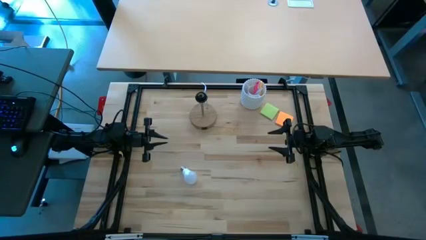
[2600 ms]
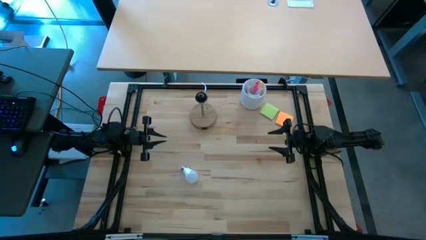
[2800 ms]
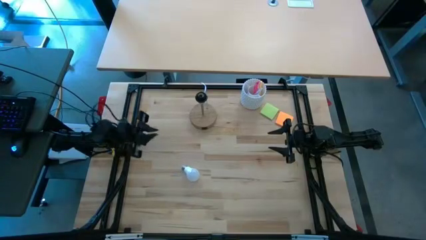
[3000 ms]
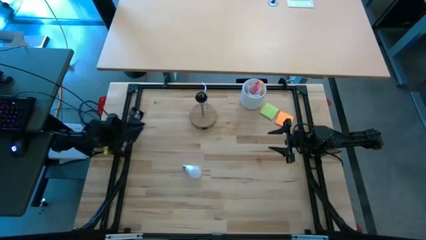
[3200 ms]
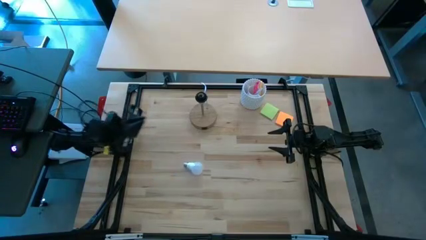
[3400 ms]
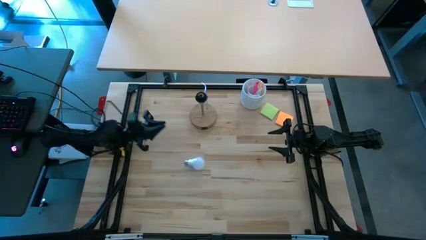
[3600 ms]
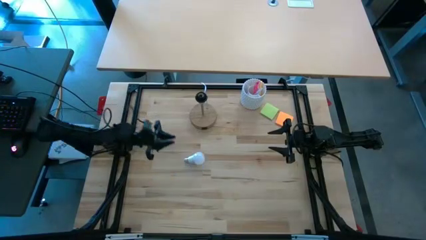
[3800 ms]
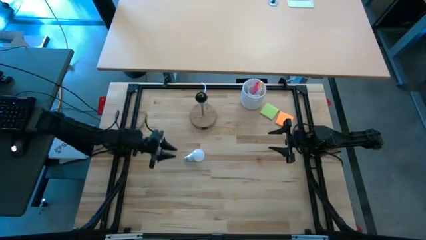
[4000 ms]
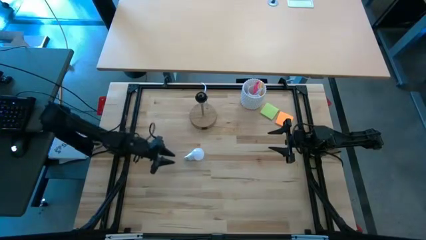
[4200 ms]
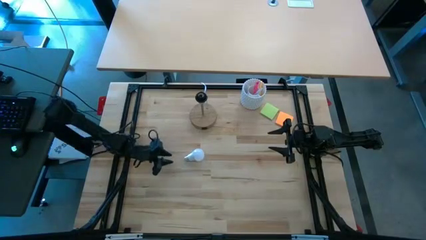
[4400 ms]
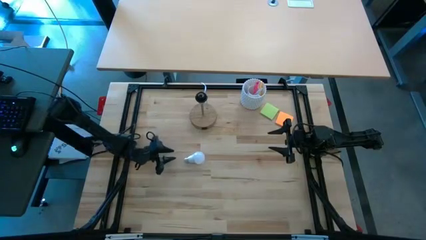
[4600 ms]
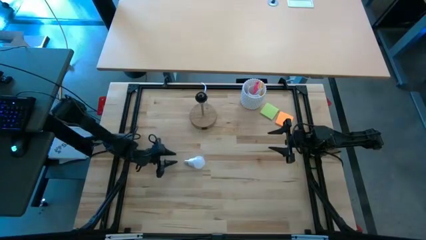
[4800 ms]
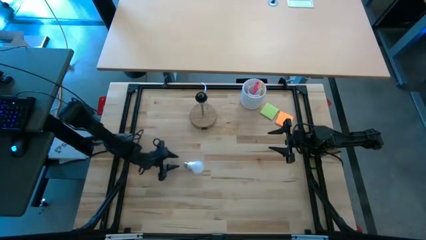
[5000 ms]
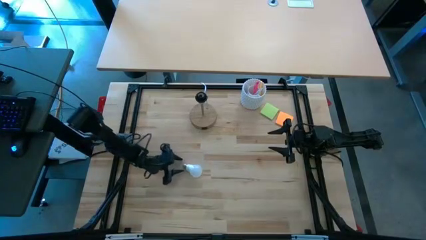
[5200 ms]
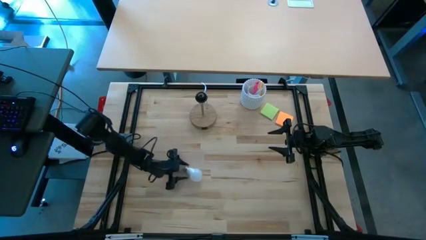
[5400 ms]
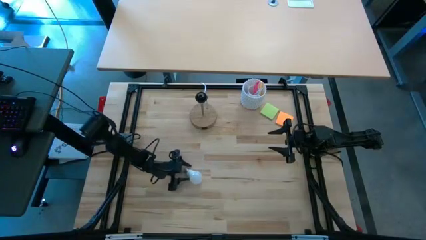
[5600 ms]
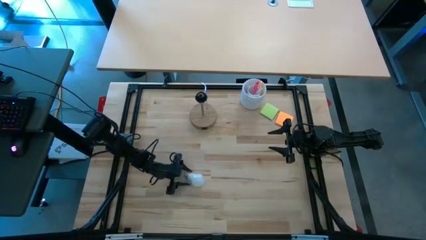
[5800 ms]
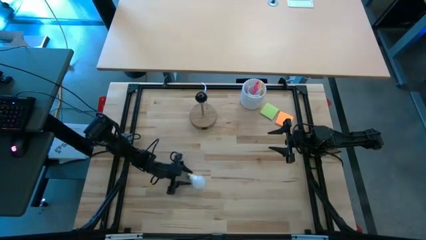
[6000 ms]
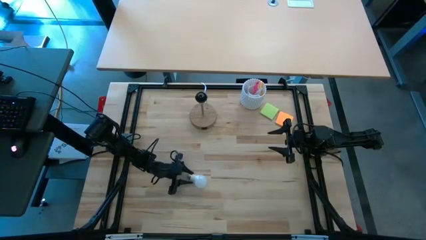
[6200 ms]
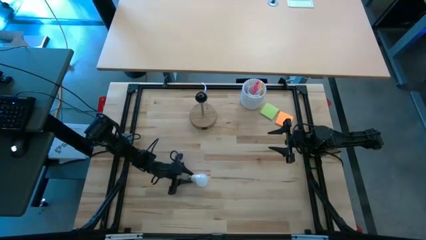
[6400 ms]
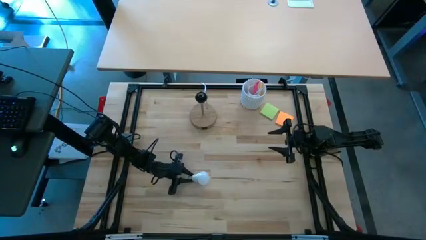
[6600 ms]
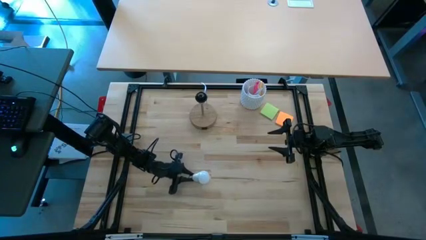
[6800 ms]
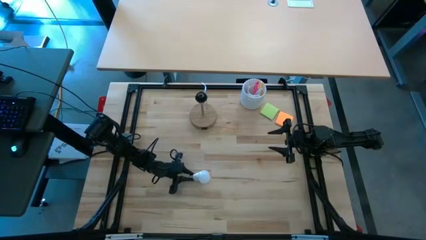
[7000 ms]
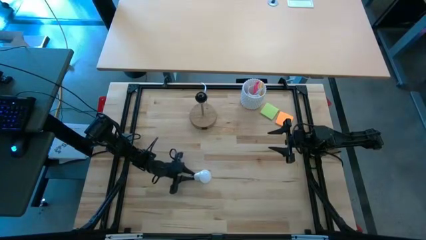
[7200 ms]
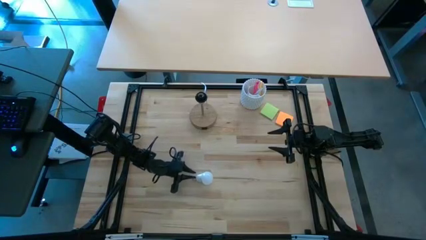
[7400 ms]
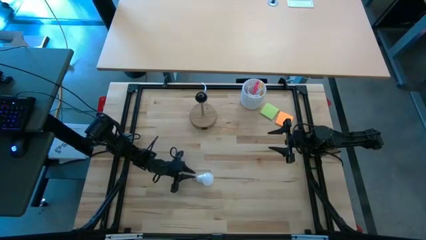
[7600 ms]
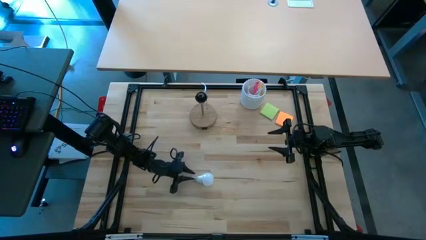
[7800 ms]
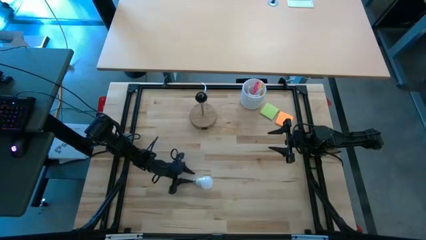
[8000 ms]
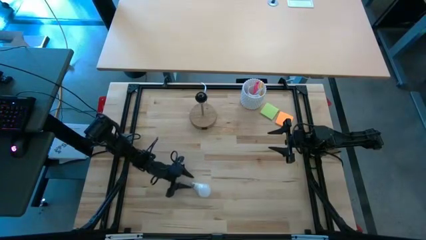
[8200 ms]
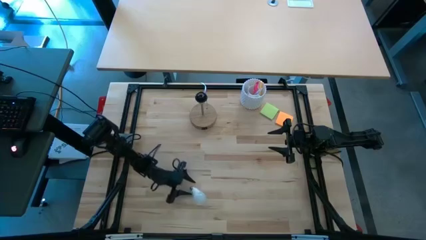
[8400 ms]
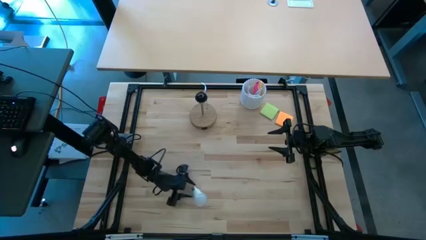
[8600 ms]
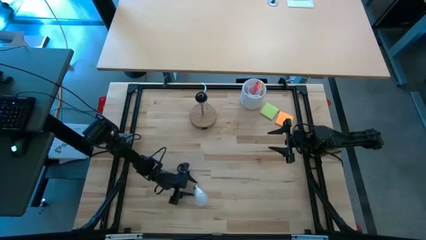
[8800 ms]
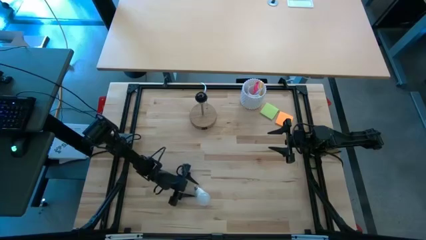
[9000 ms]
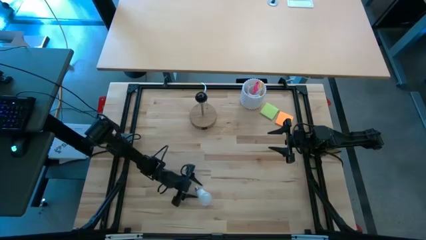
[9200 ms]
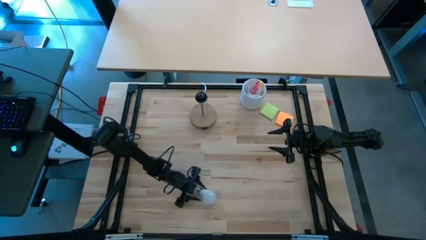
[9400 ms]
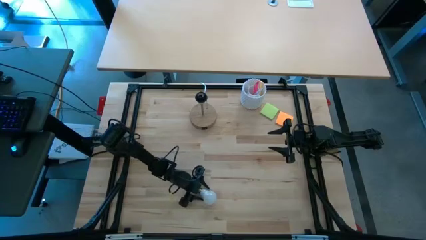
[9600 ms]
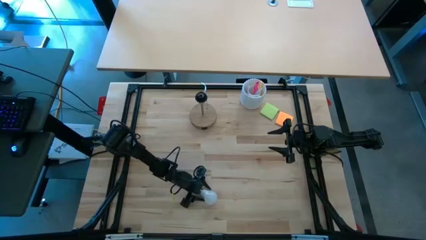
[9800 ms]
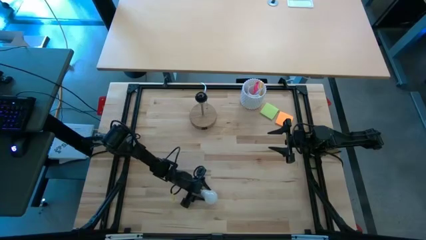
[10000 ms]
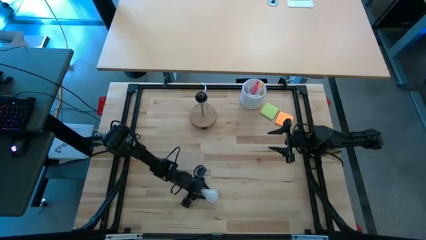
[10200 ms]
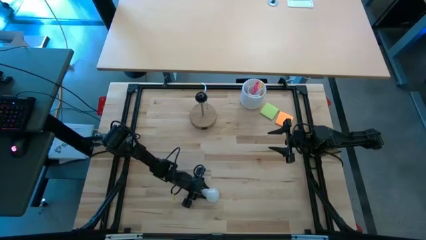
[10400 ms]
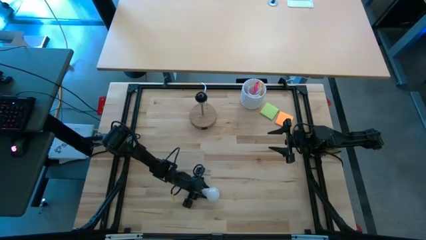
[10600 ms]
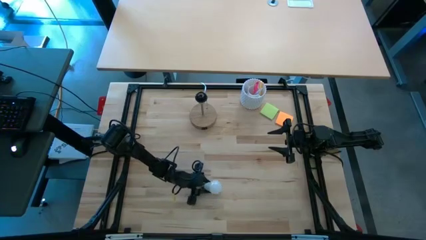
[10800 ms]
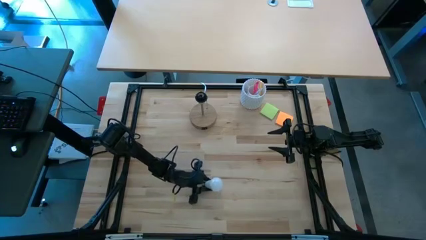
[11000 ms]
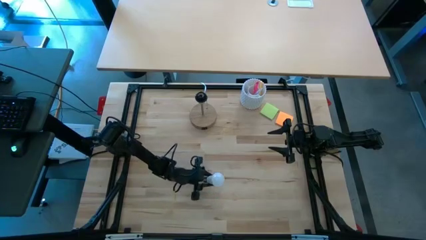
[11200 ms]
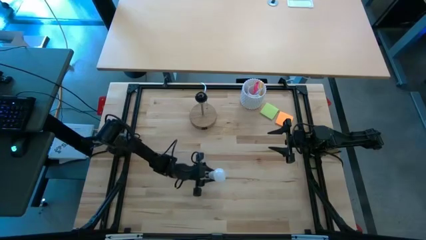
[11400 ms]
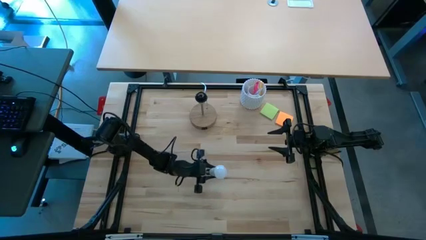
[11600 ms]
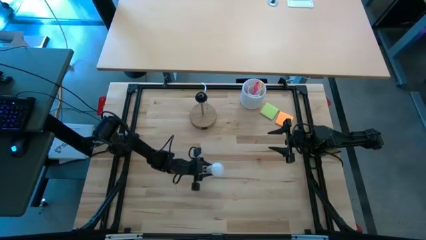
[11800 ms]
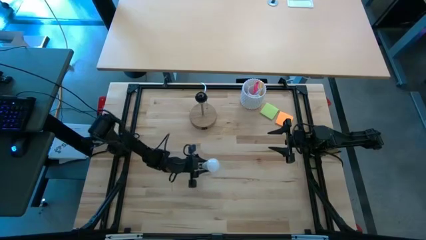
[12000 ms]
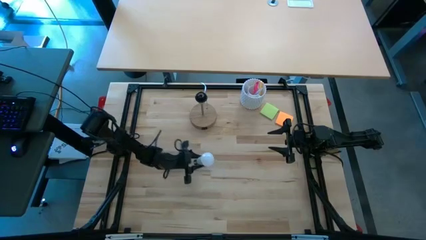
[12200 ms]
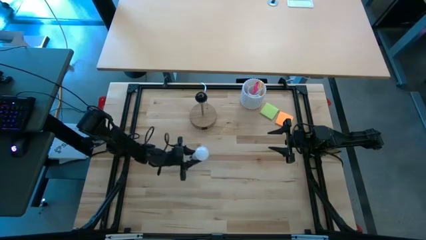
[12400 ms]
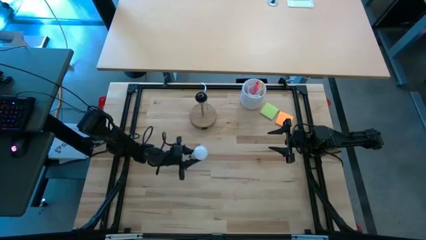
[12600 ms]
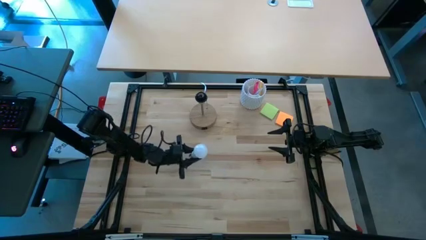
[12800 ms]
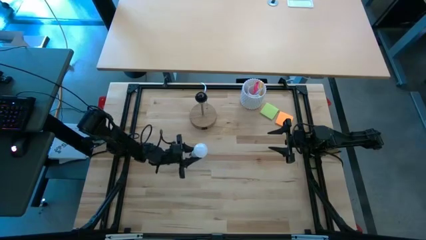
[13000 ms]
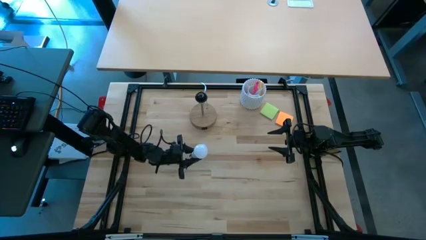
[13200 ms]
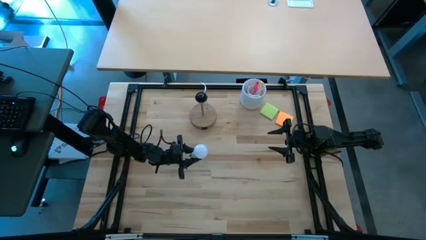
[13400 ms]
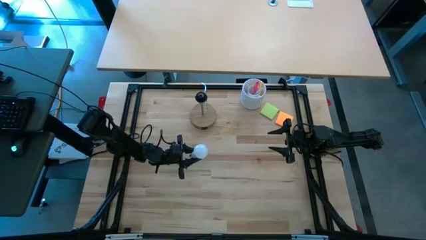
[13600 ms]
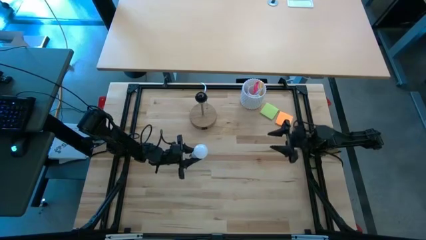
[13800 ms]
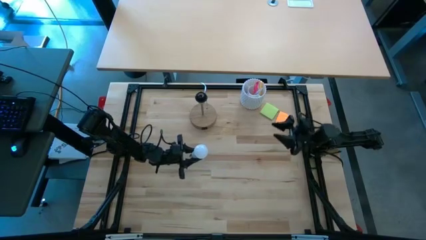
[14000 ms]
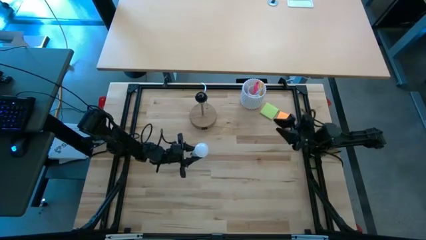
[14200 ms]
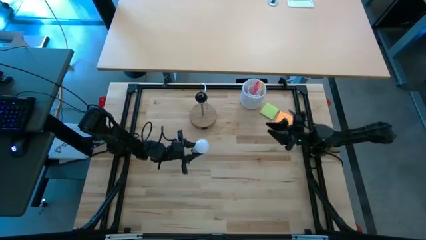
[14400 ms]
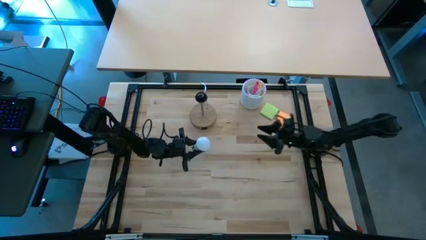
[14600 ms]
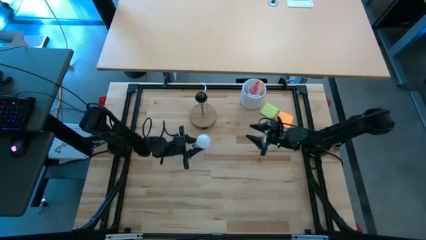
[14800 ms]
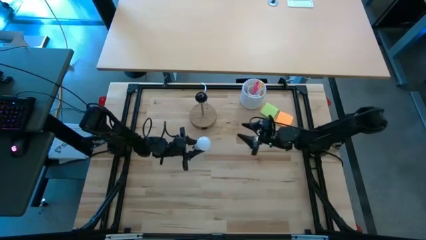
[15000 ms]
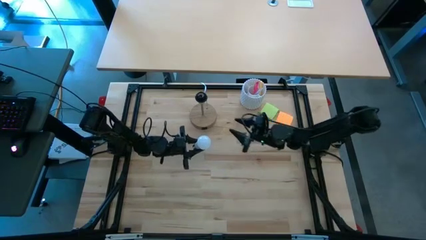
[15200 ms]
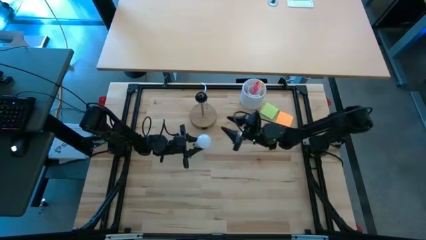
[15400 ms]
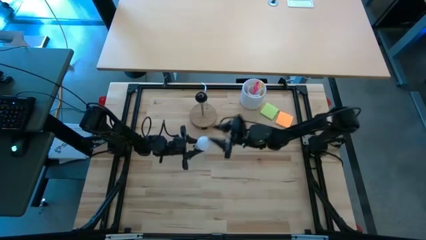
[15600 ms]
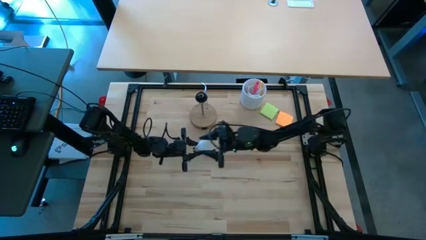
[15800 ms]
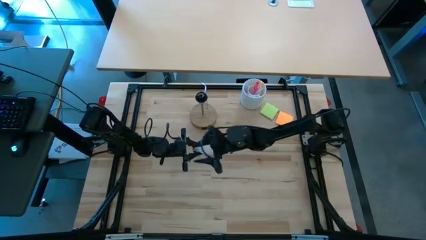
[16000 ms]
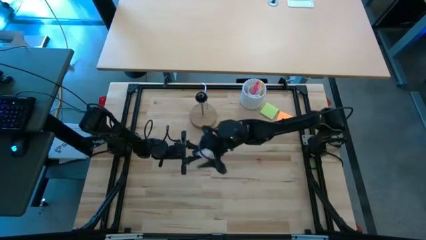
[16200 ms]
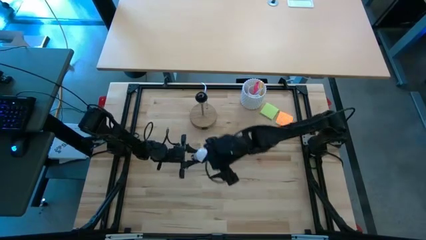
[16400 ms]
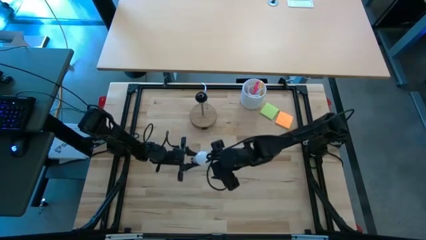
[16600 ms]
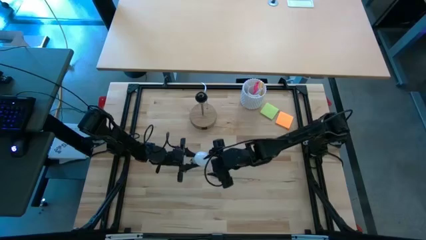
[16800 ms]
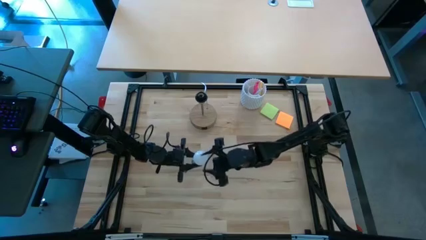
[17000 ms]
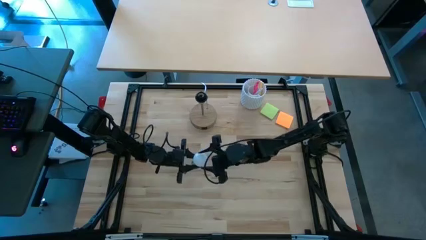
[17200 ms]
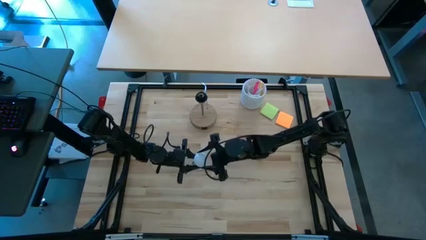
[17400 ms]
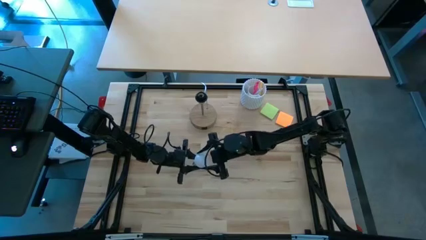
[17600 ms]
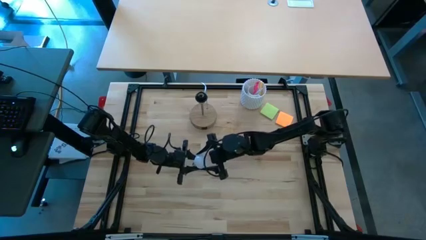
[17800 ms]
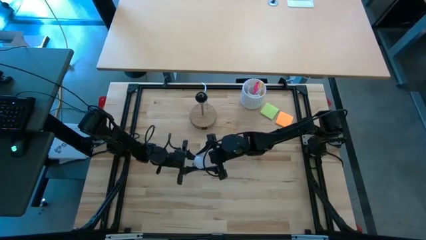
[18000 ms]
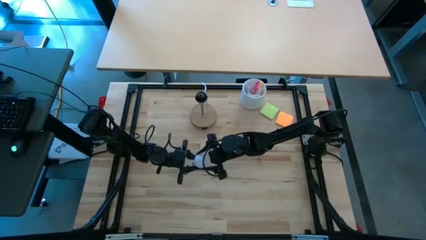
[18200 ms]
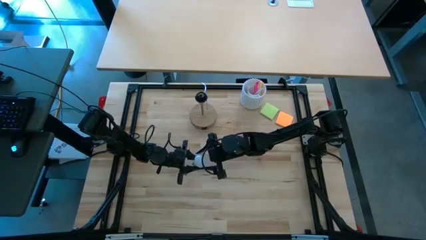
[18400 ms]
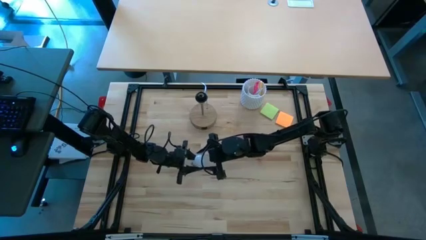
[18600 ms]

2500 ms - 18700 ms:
Task: Screw lightbulb
Insert the light bulb into the lamp
